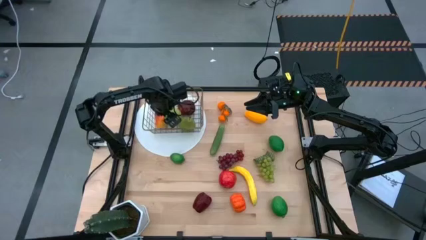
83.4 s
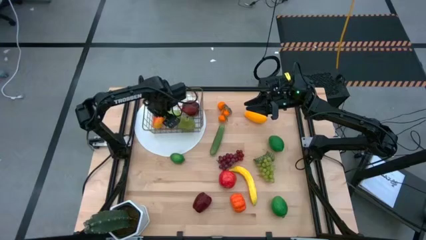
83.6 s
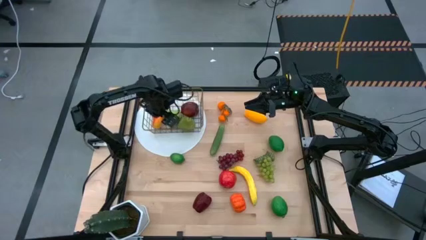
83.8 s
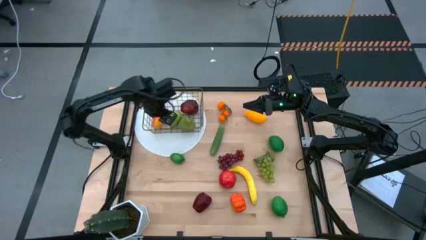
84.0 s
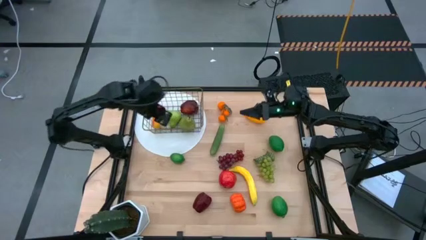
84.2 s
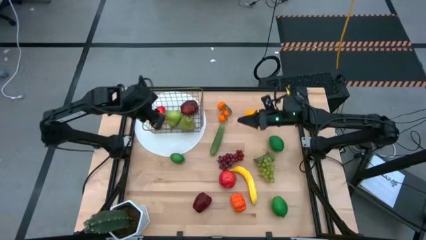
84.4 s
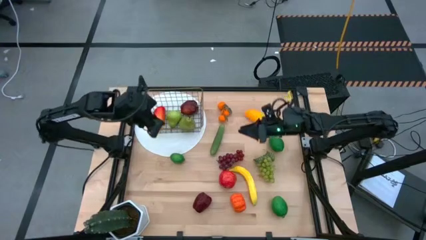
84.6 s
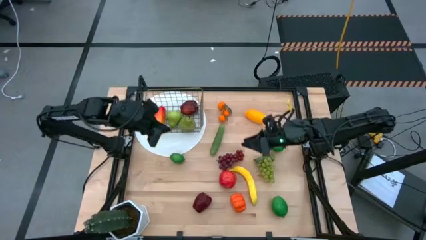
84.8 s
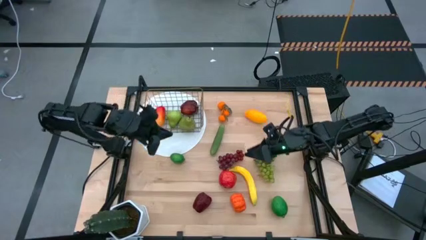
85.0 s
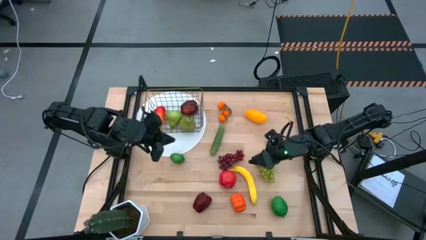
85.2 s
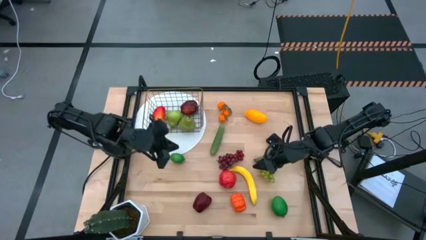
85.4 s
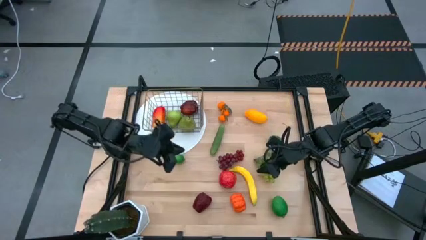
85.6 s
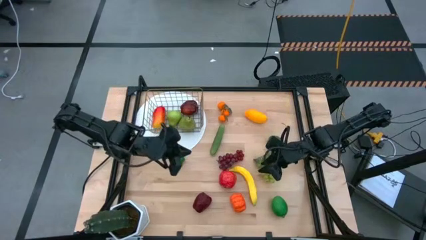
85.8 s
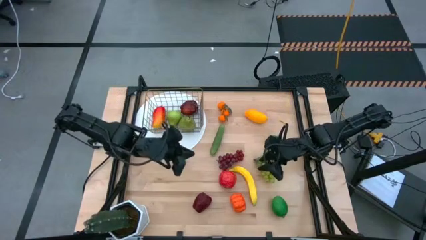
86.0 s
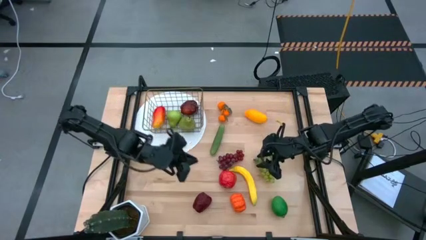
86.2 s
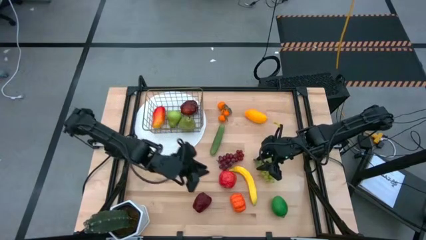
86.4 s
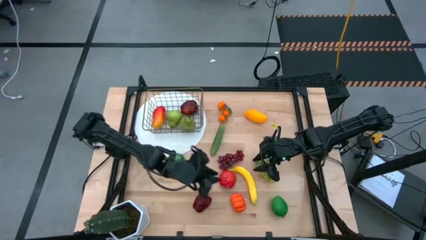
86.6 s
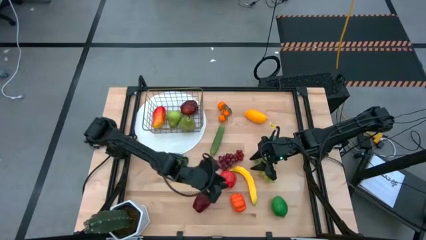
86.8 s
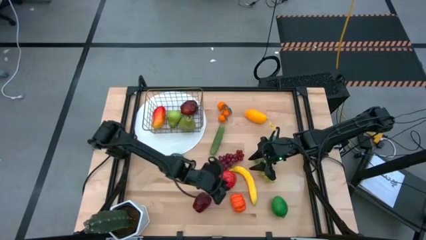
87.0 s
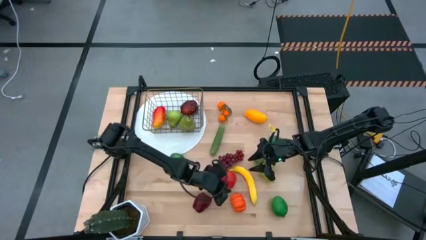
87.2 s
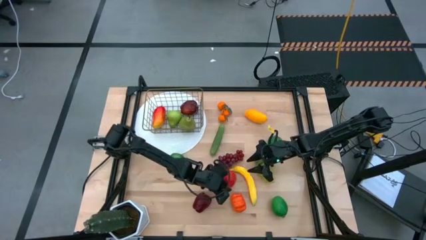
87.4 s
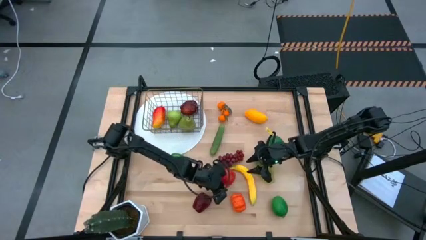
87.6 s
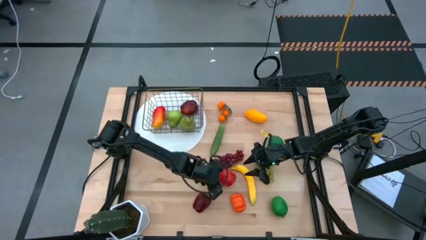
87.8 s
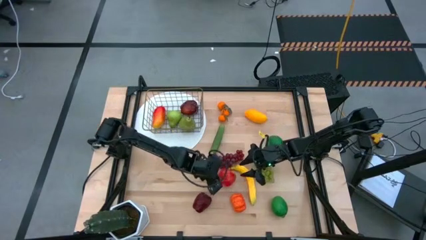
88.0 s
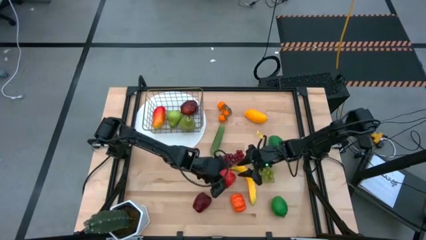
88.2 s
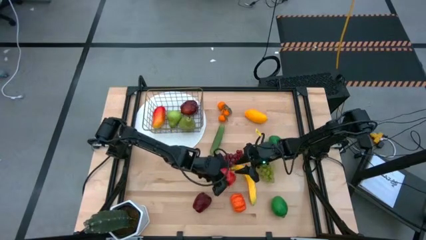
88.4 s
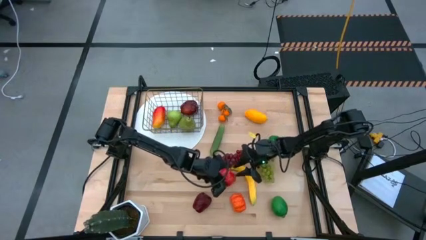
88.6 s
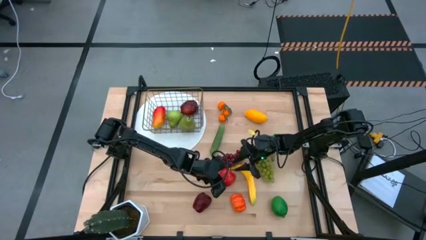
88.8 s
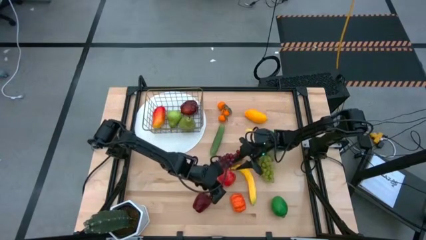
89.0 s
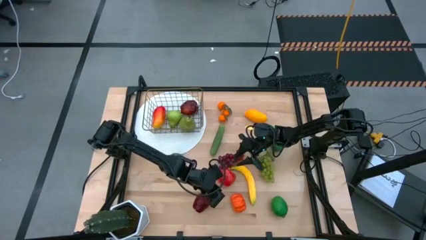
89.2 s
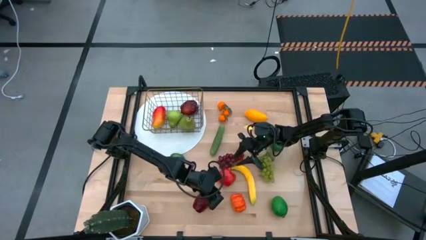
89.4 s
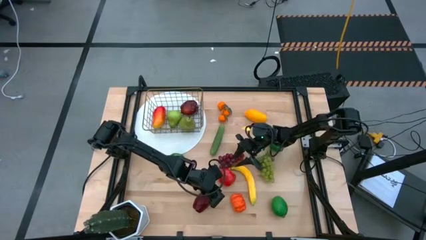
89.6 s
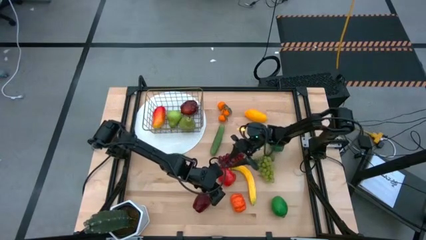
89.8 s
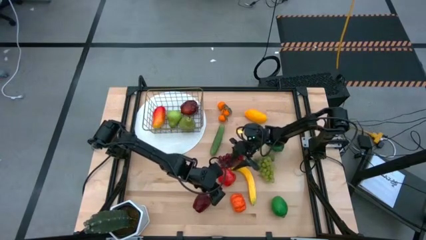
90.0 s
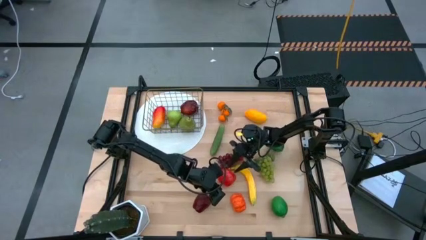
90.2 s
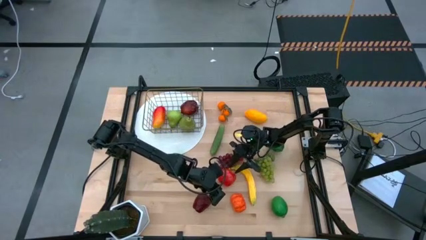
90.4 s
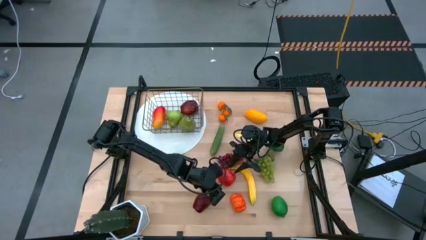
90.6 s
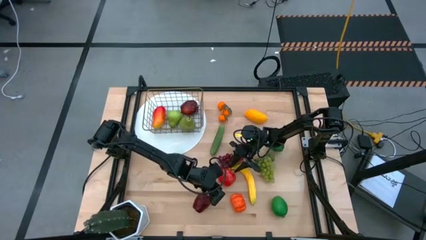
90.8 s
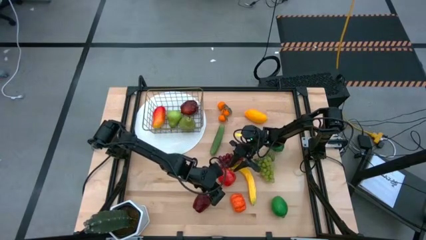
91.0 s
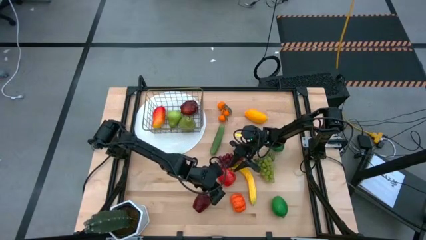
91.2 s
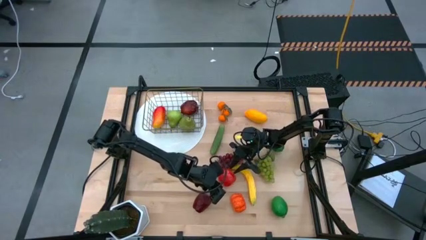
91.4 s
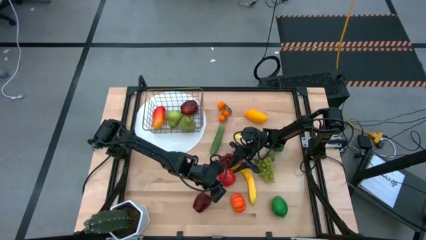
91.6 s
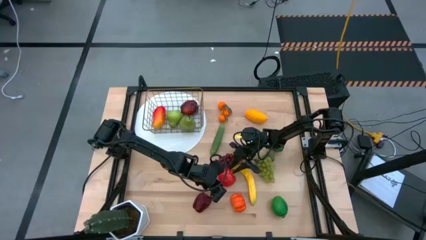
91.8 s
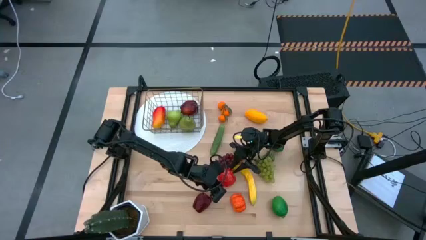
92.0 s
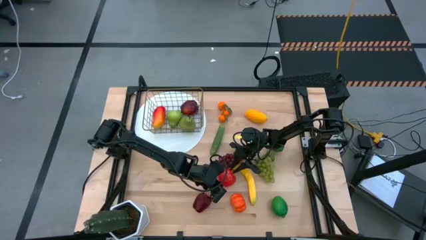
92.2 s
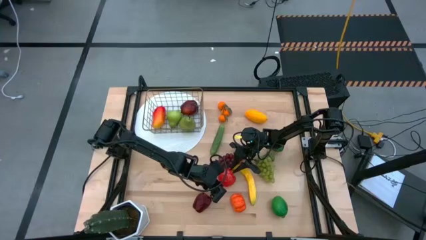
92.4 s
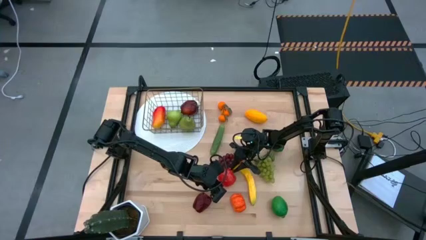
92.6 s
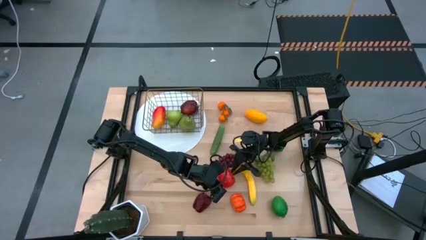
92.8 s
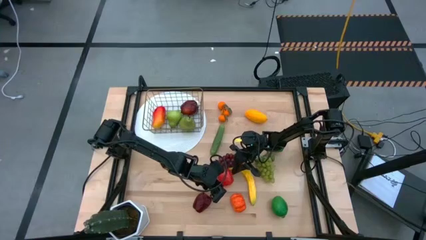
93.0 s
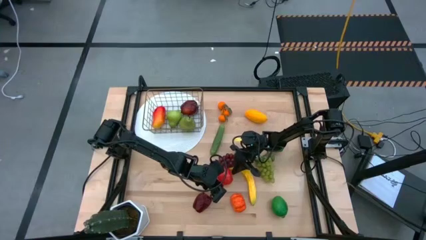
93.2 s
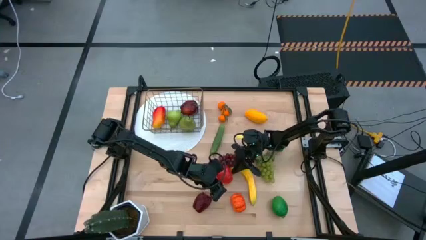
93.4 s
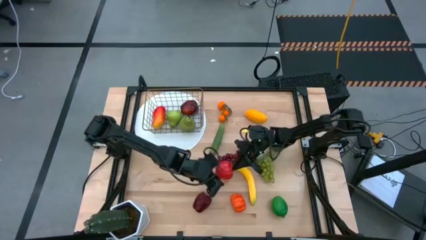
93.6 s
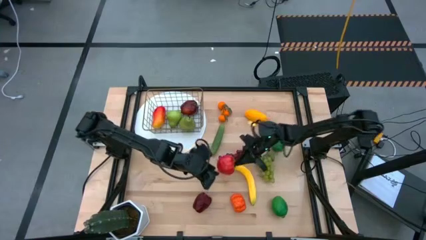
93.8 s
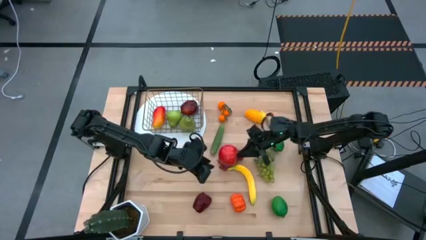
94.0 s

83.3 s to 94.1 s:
Task: Build produce basket
Put the orange apple into the wired basket

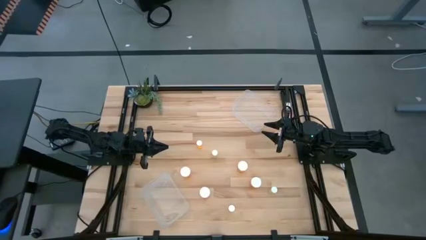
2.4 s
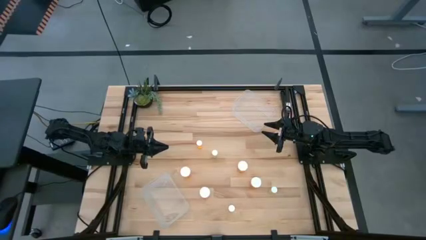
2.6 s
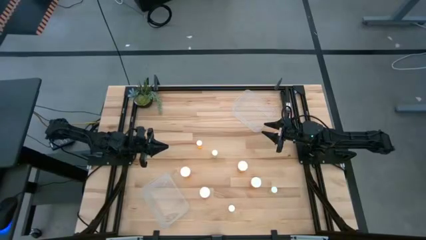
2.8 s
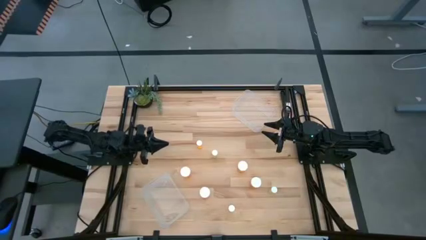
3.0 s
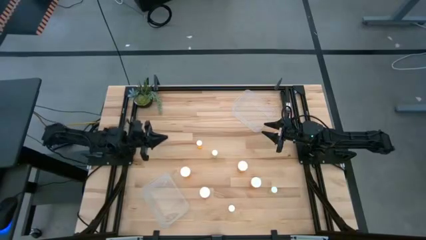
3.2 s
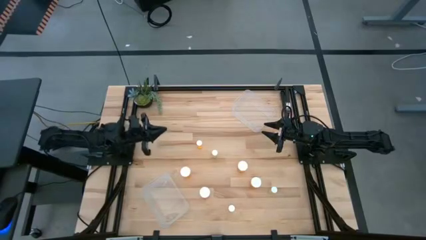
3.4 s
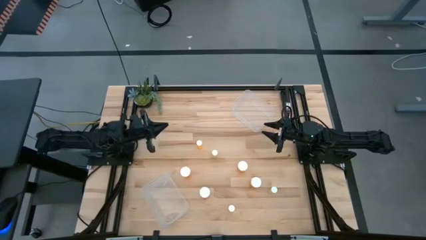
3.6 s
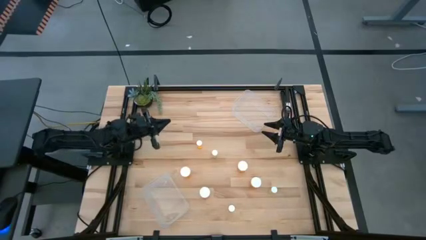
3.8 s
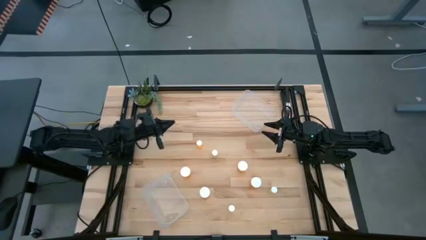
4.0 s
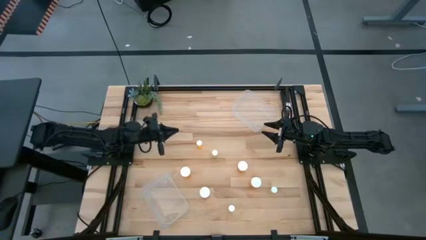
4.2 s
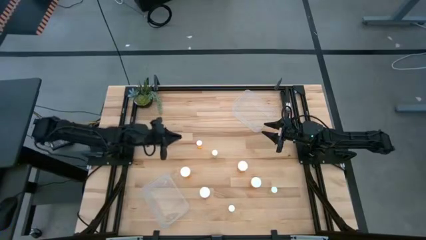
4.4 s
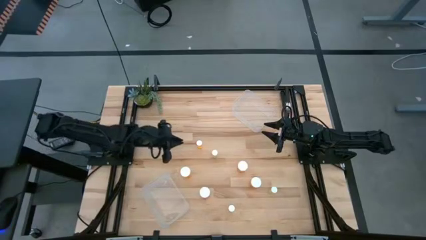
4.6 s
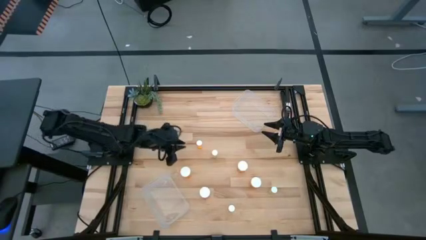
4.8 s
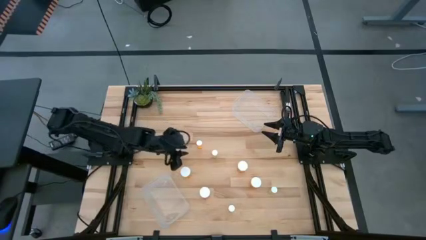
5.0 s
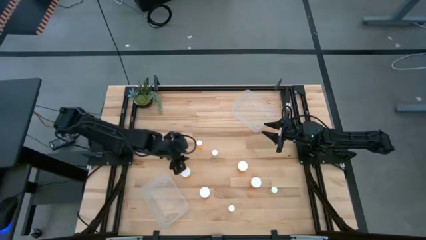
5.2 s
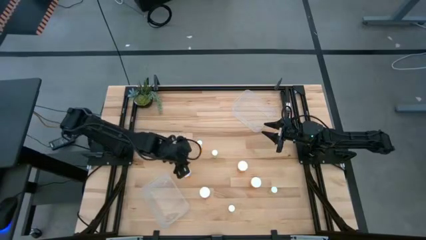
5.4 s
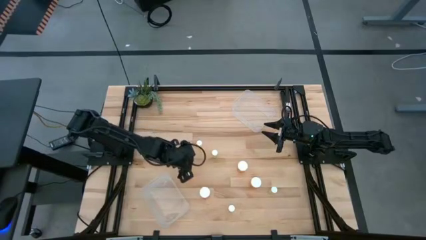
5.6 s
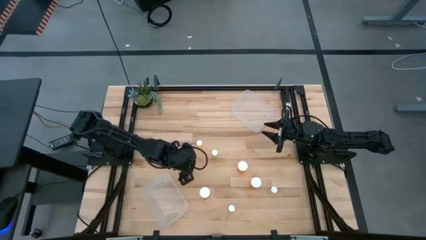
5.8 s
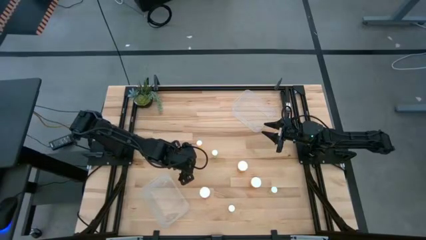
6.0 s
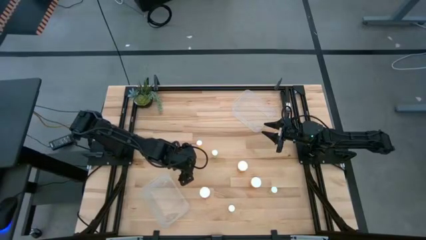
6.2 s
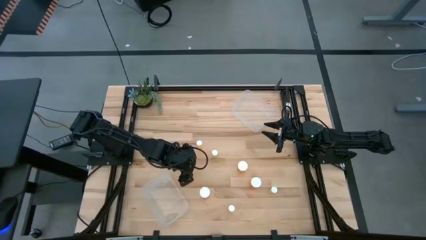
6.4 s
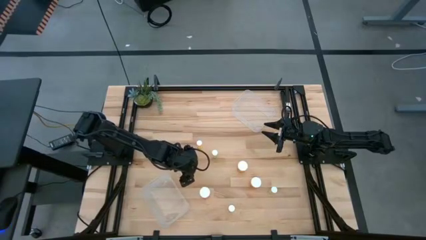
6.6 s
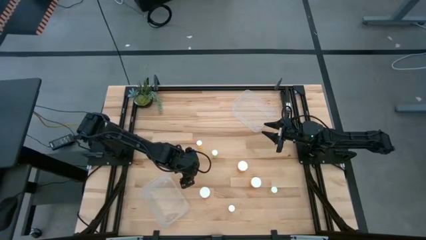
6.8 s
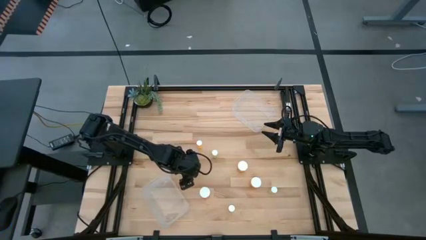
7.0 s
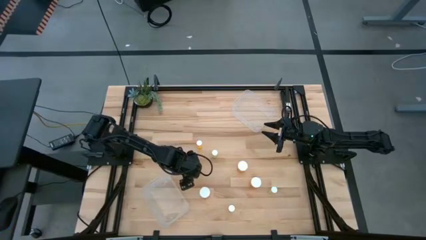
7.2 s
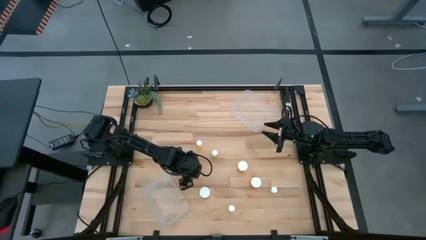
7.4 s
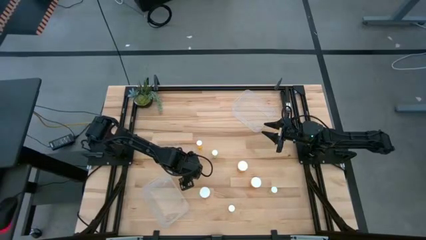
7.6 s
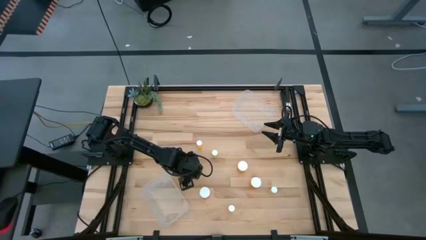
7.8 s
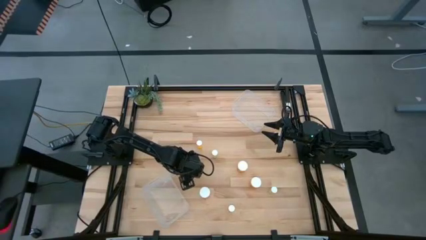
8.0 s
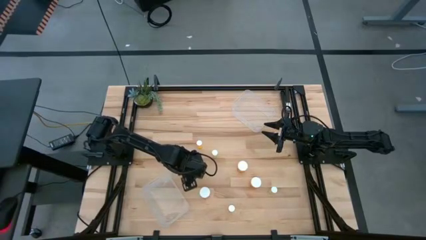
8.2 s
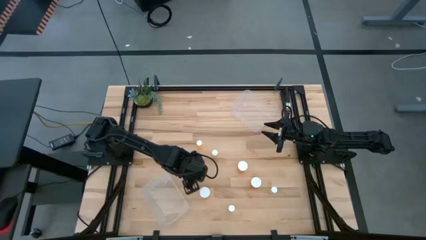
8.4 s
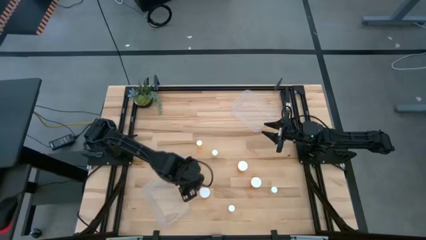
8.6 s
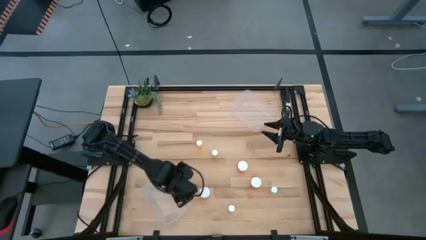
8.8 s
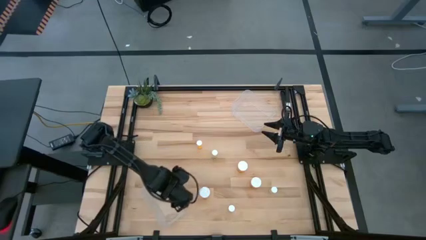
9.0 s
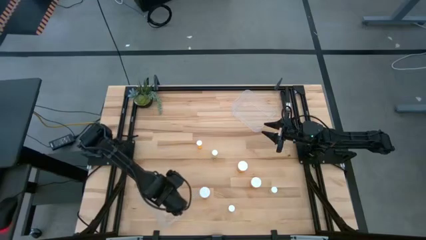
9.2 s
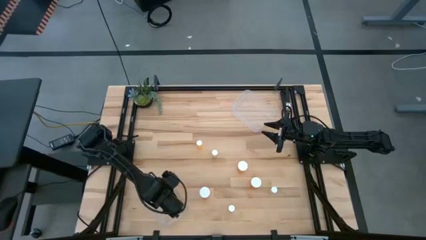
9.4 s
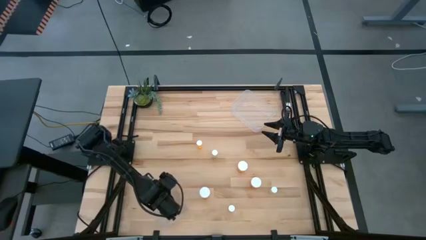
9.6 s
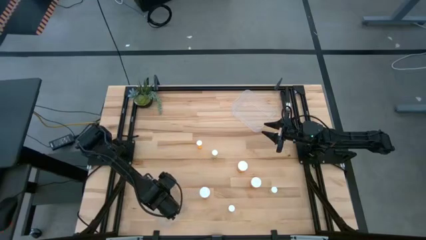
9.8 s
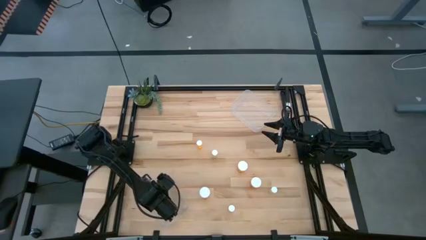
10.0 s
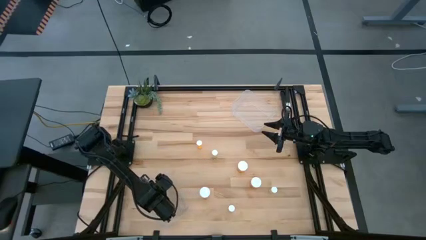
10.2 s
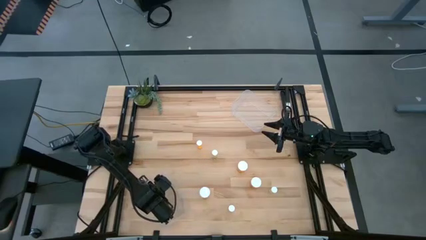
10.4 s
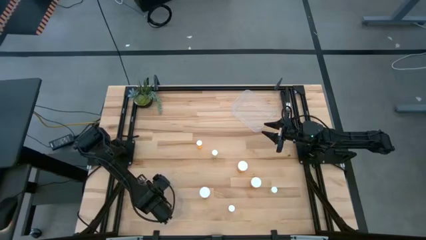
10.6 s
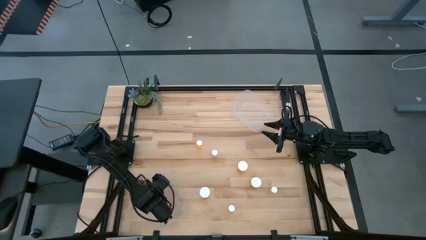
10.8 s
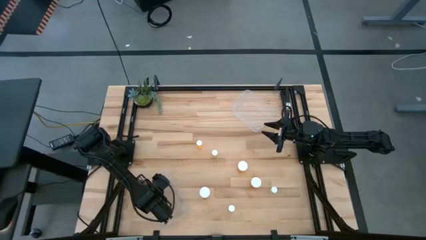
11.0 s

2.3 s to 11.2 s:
Task: Pick and place medicine bottles into bin by pill shape (circle, oval)
Put the big orange pill bottle into the bottom transparent bin
